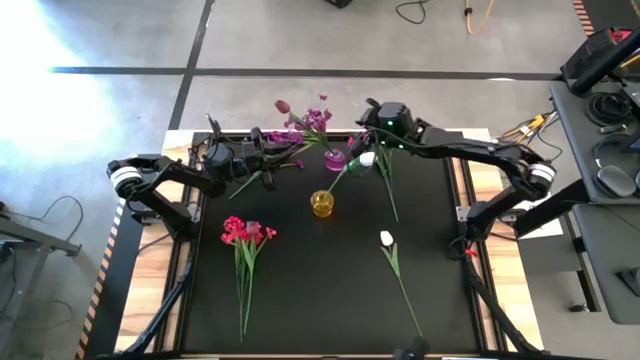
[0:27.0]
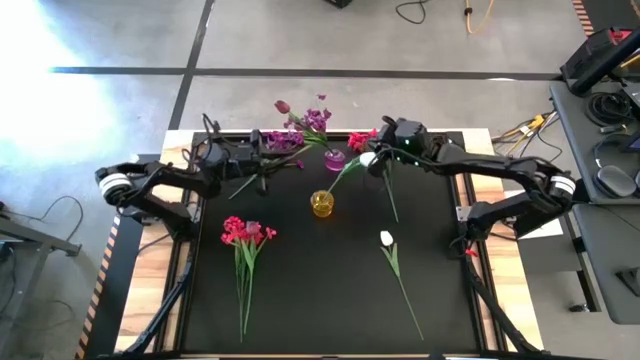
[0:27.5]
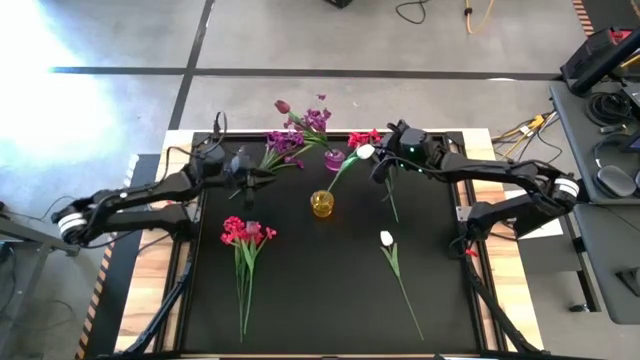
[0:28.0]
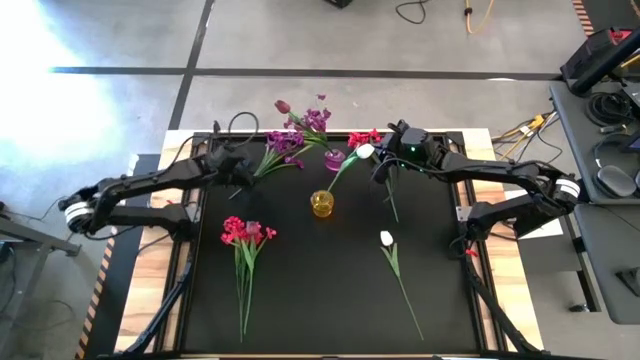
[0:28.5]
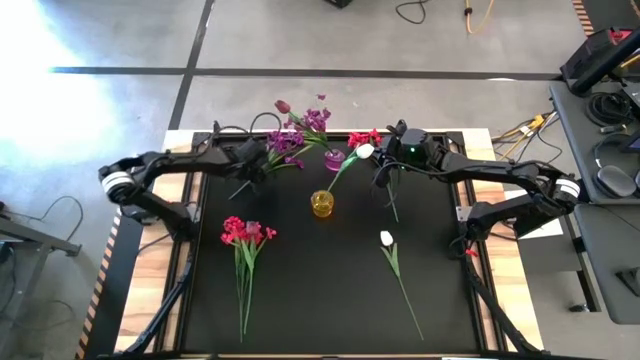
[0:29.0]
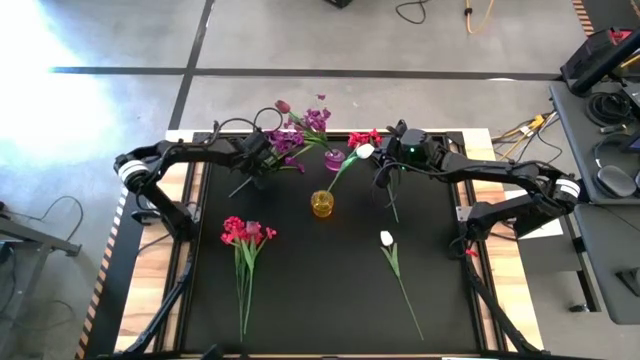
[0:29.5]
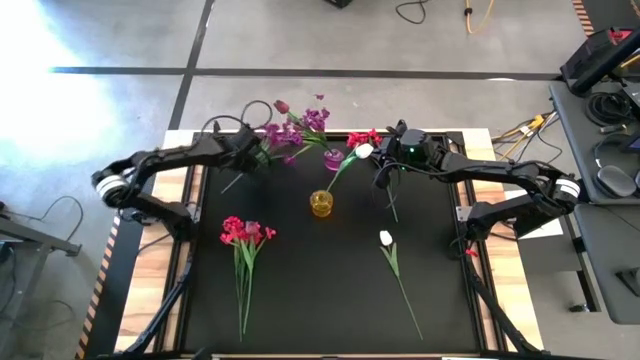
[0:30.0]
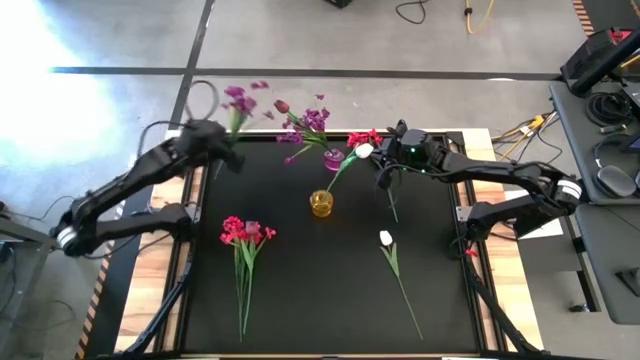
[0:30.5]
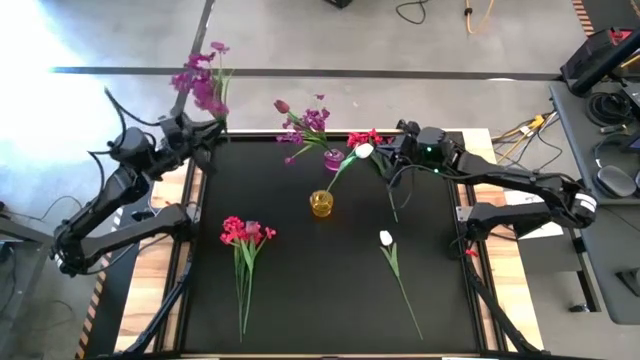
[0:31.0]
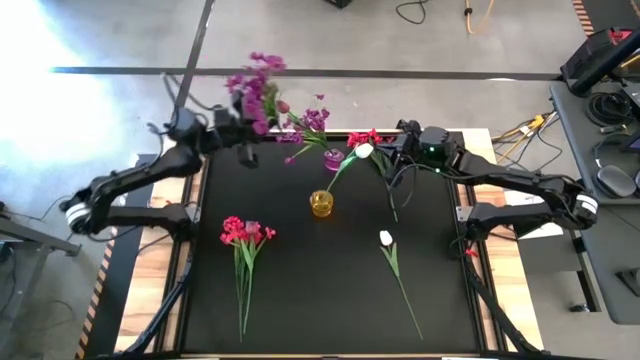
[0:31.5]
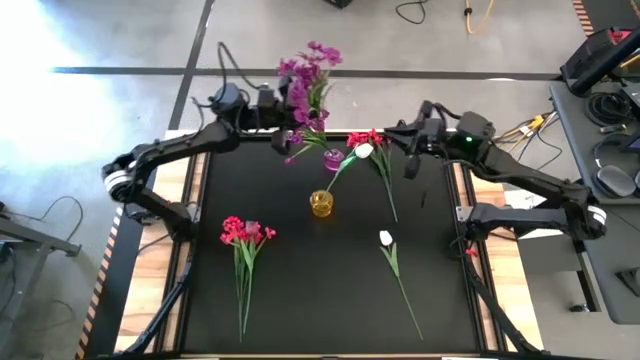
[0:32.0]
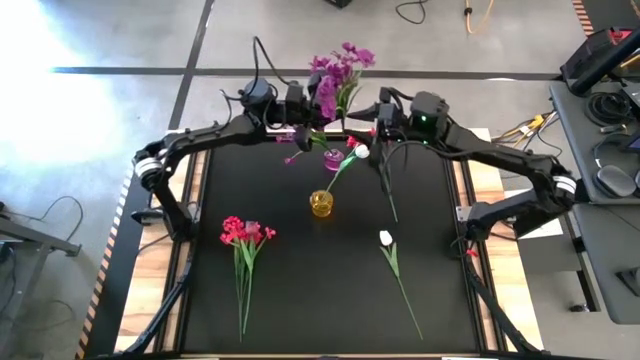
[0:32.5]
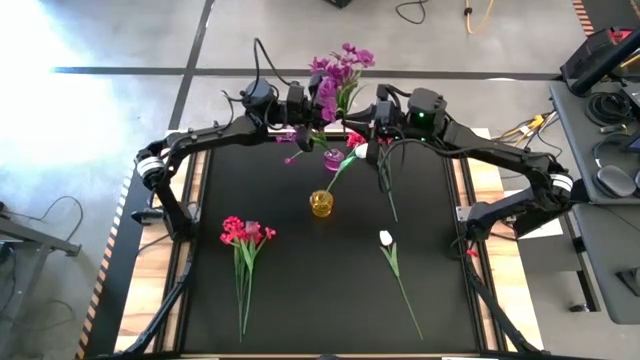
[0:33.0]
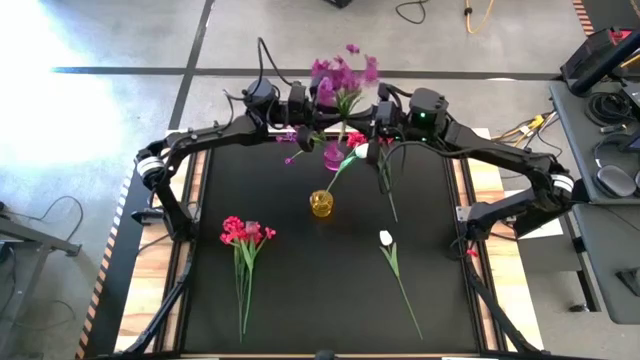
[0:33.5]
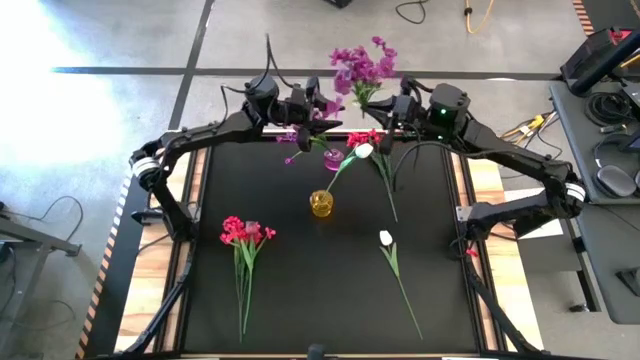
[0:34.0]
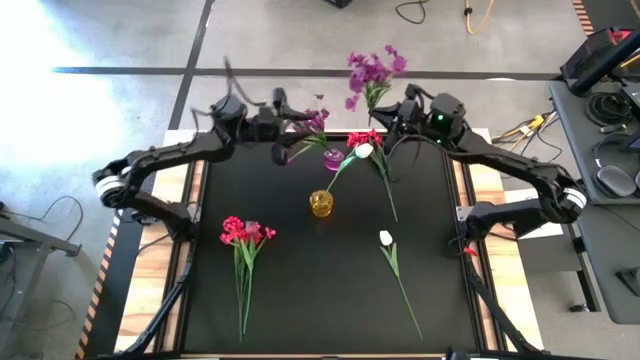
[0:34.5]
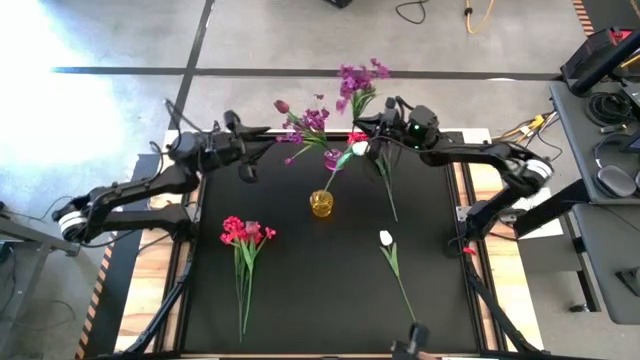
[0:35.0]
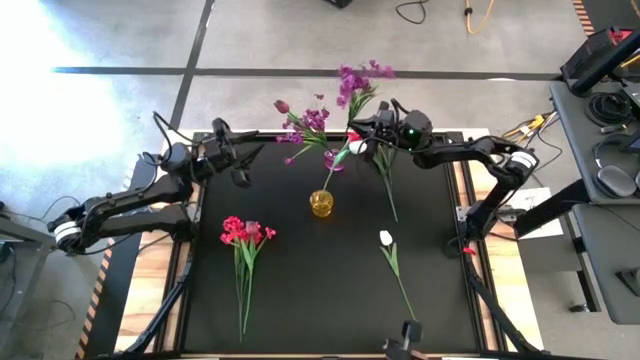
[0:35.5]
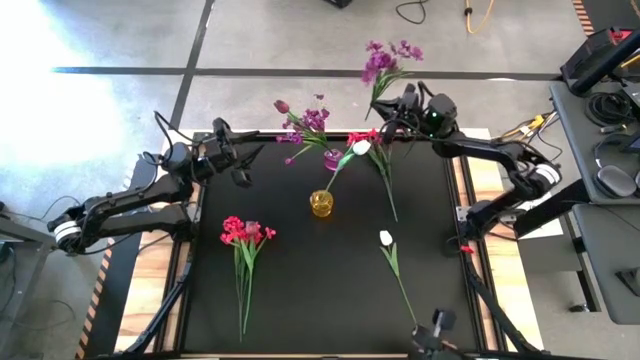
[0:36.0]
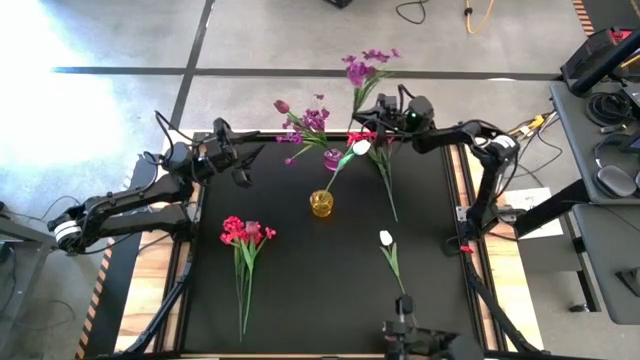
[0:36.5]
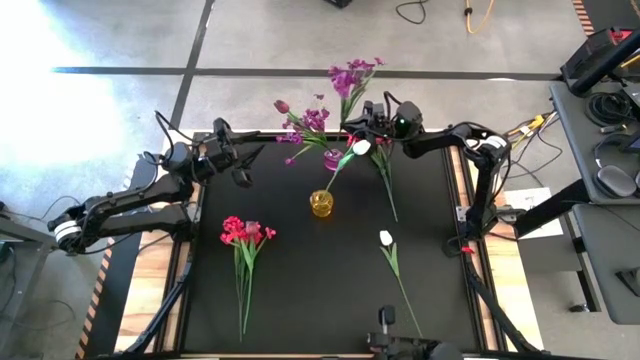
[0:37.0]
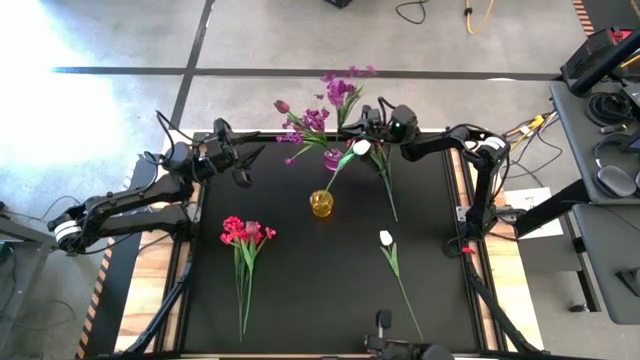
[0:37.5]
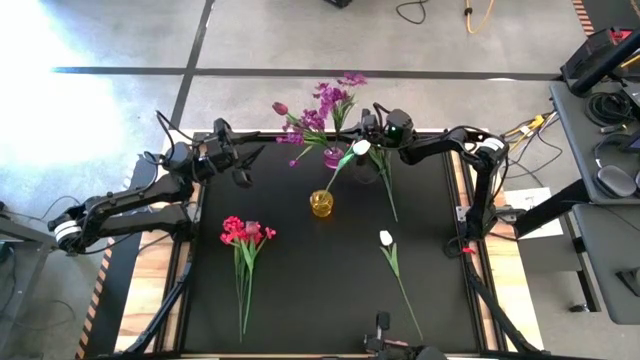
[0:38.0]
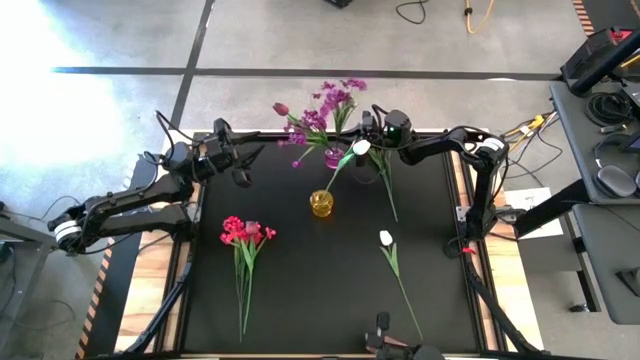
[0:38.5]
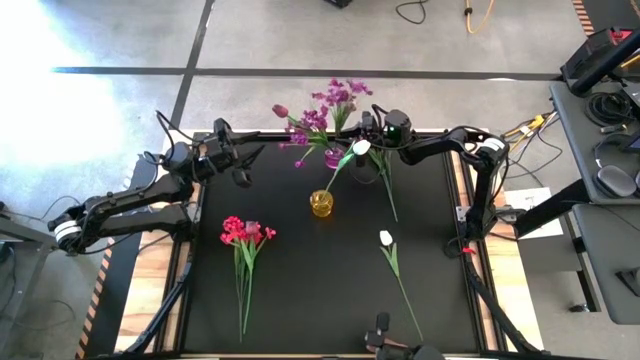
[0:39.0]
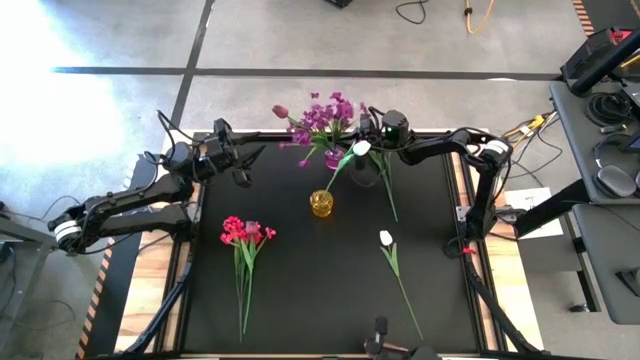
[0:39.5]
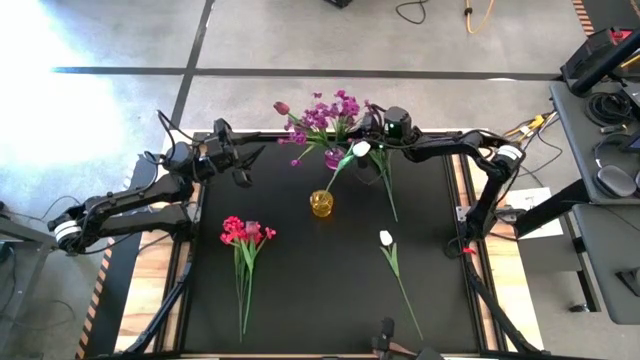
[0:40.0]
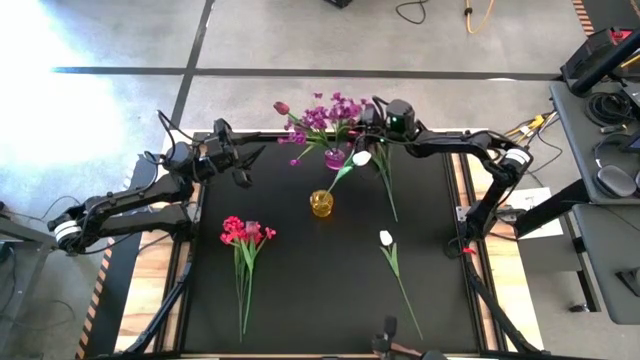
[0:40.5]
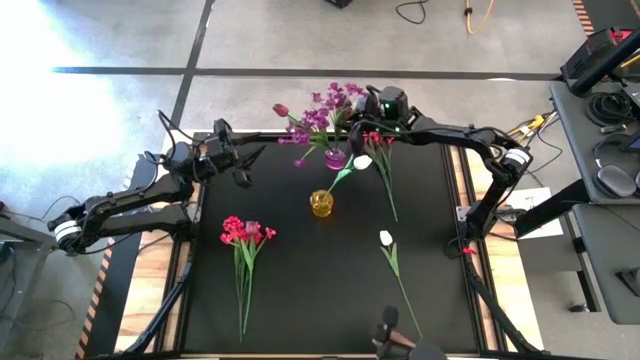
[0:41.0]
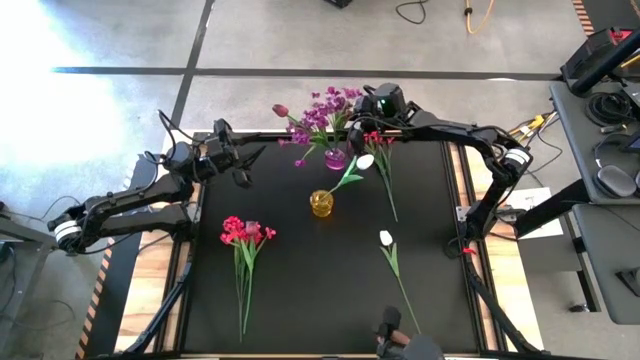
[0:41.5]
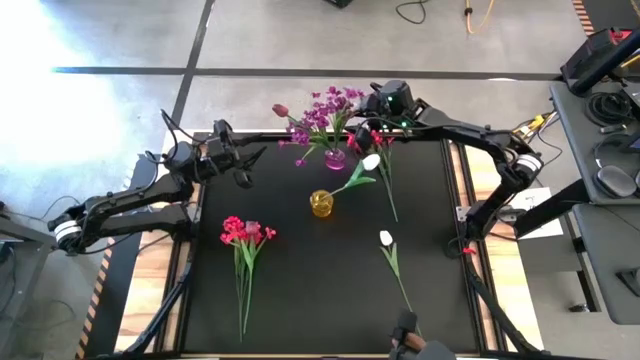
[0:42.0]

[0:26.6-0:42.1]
Task: Sort flowers into vase by color
Put the purple flowers into the violet vase

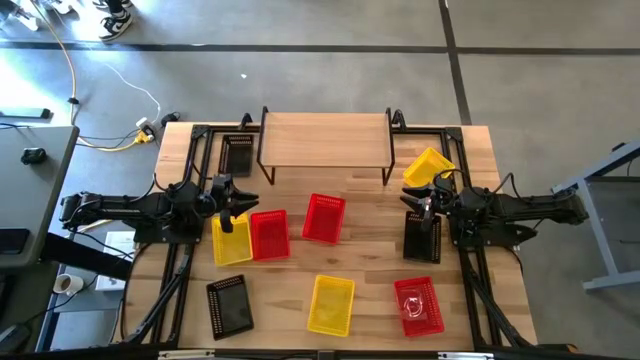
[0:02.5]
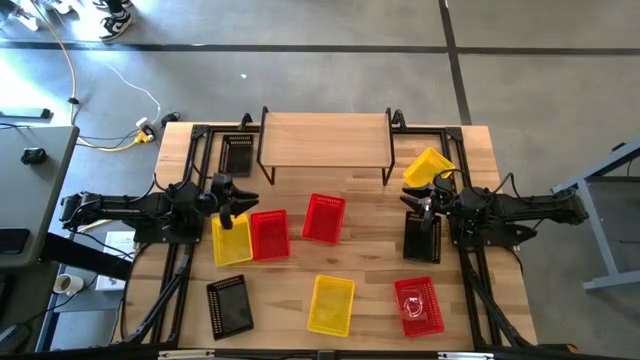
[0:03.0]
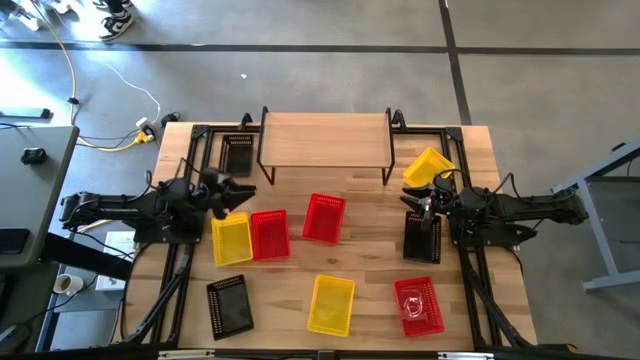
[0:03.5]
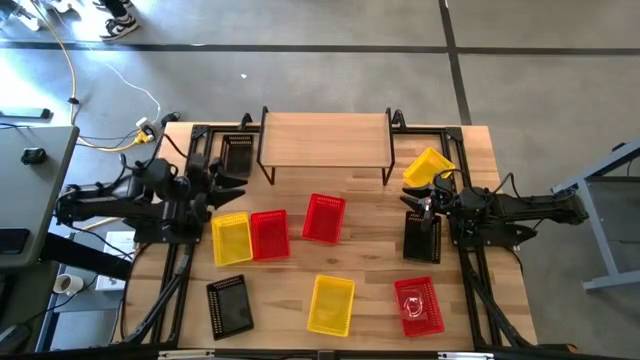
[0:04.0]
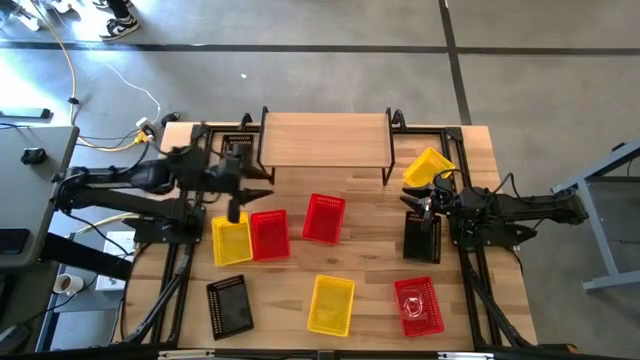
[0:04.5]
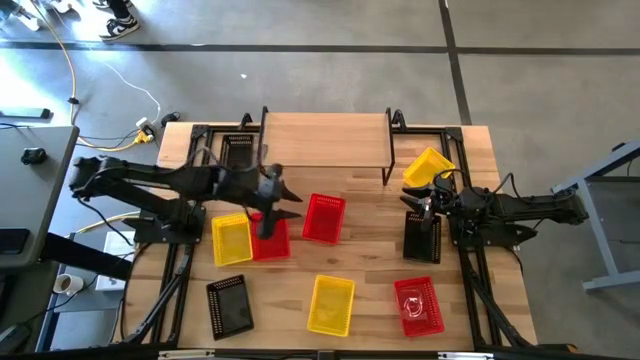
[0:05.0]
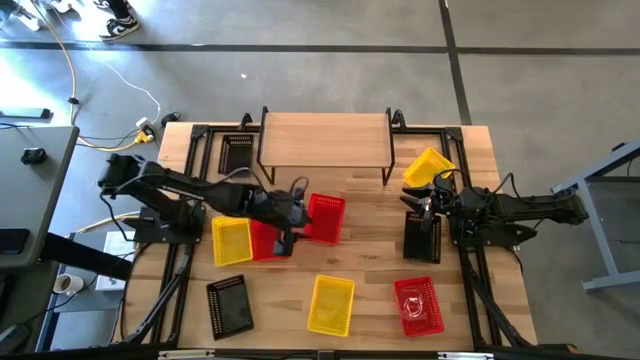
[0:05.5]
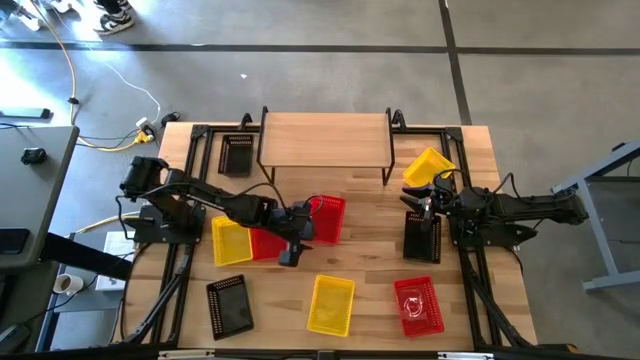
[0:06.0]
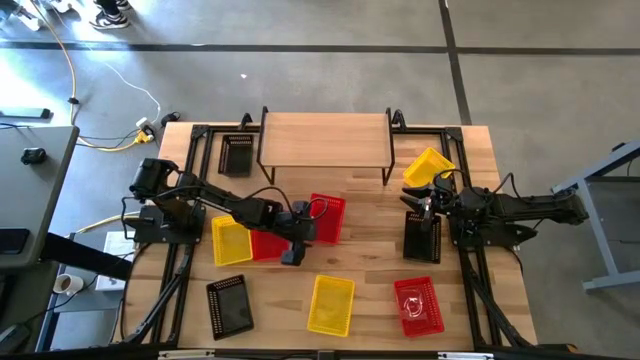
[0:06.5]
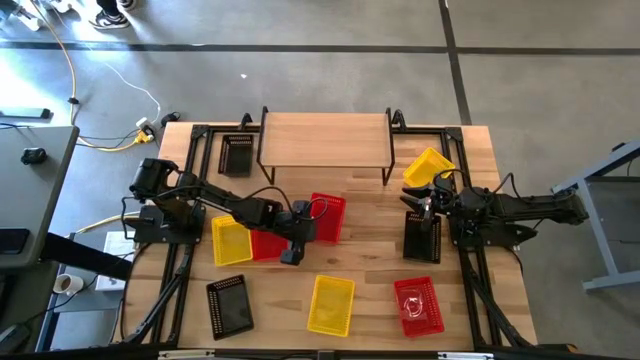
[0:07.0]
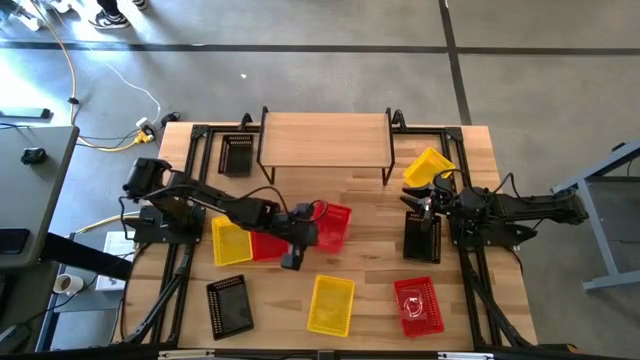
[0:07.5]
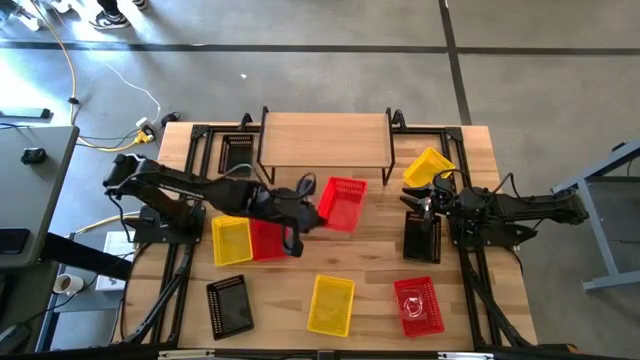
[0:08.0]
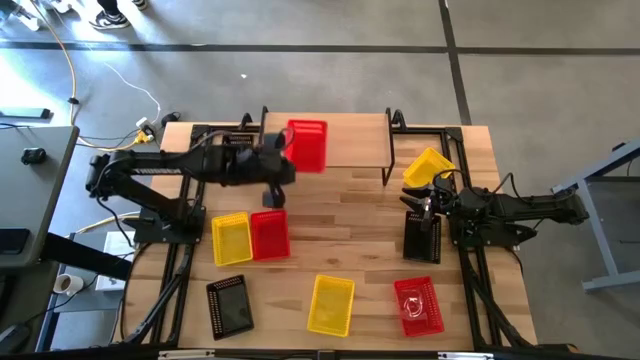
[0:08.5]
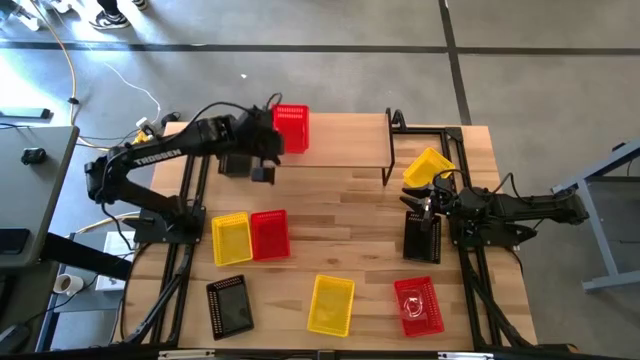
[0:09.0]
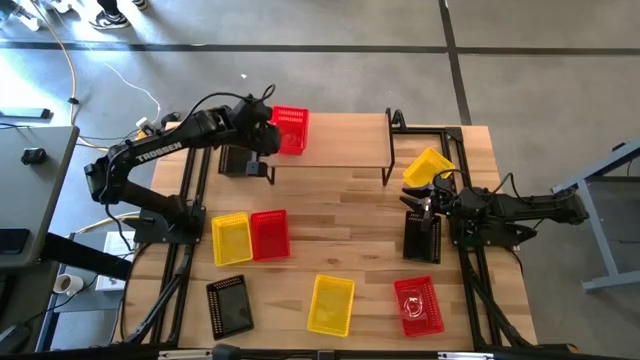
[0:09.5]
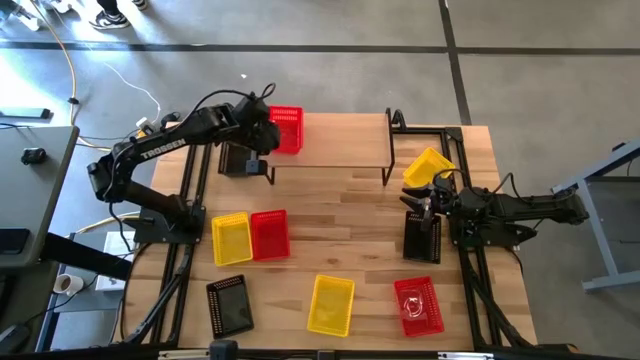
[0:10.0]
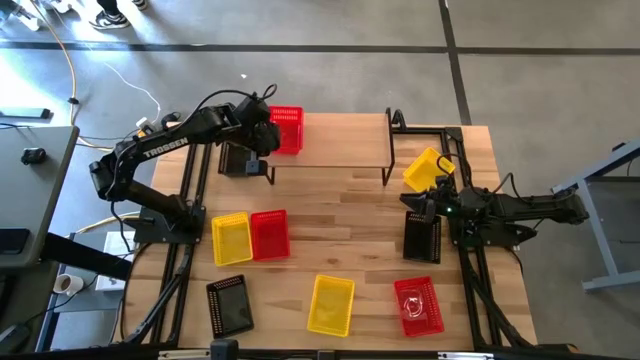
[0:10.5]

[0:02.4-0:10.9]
Task: Stack baskets on shelf by color
Put the top right red bin on the shelf
